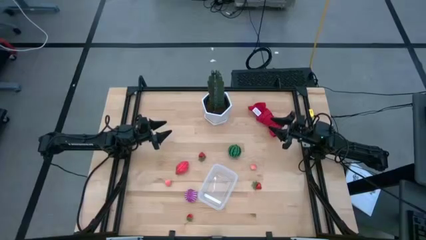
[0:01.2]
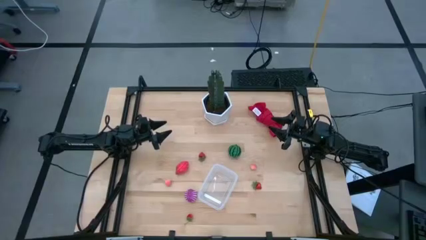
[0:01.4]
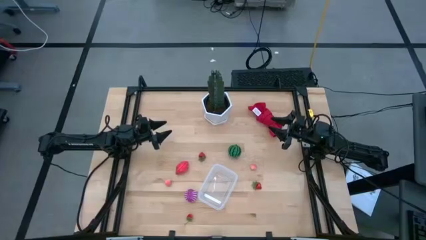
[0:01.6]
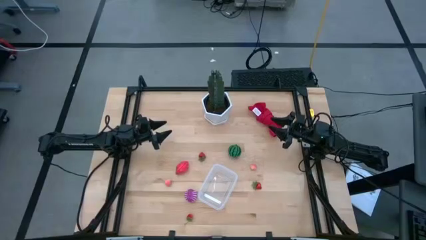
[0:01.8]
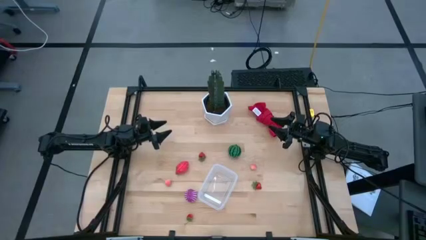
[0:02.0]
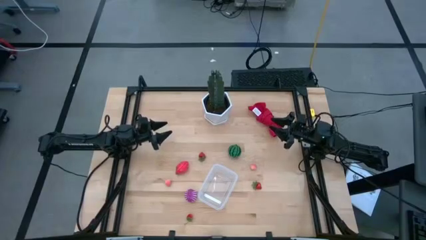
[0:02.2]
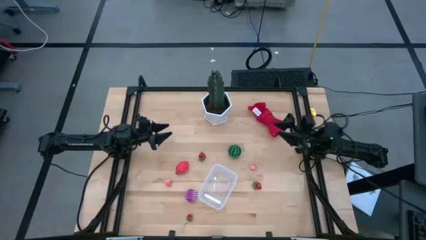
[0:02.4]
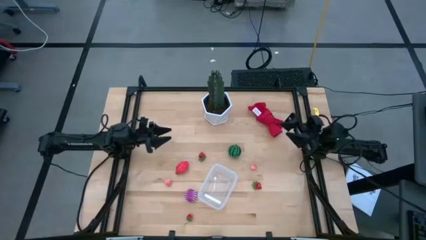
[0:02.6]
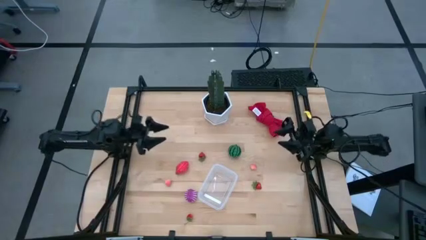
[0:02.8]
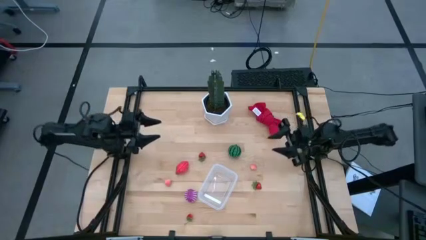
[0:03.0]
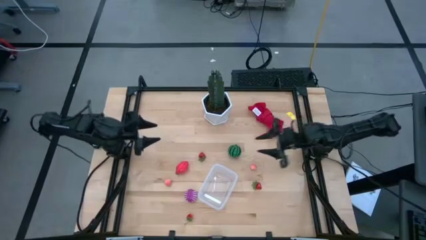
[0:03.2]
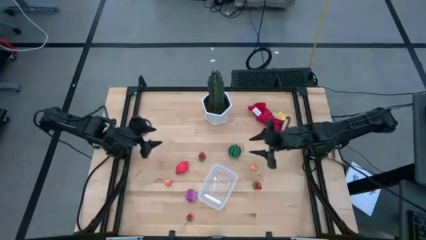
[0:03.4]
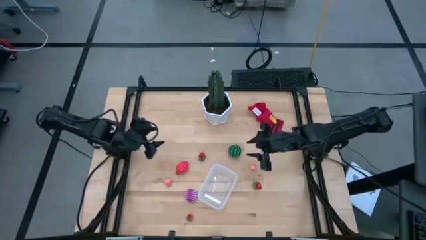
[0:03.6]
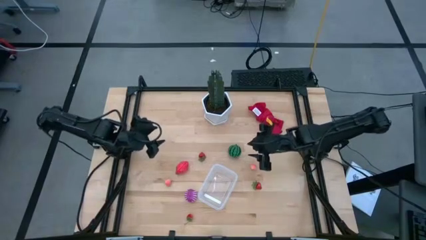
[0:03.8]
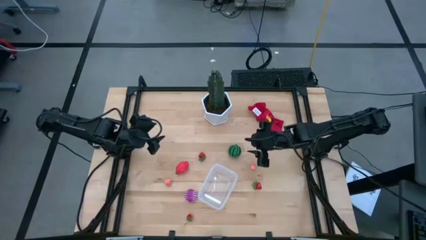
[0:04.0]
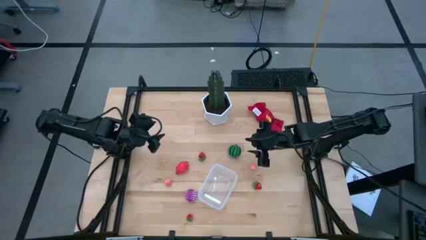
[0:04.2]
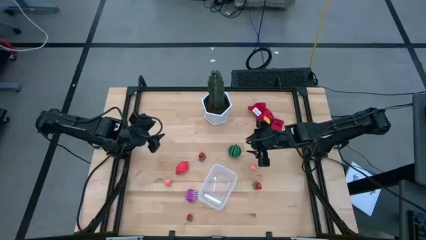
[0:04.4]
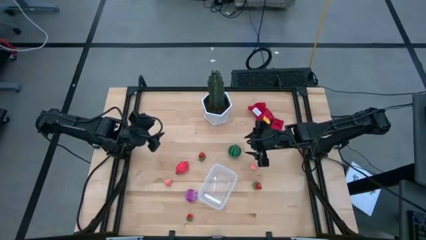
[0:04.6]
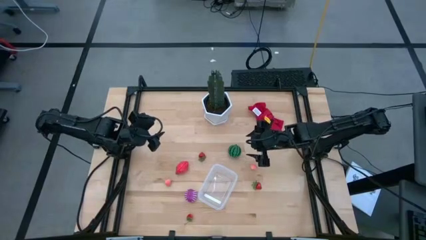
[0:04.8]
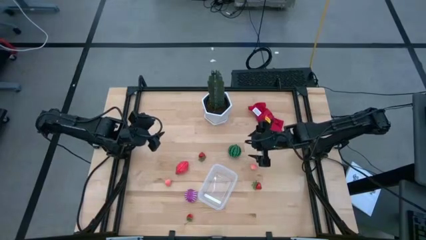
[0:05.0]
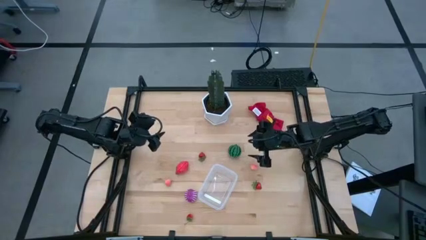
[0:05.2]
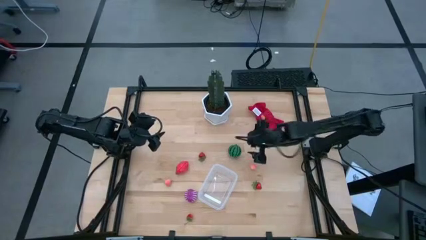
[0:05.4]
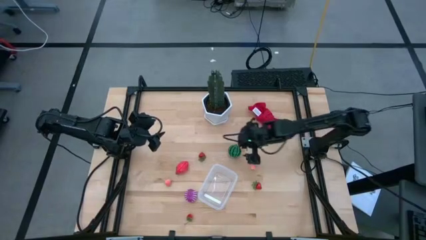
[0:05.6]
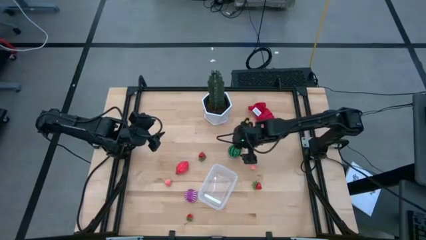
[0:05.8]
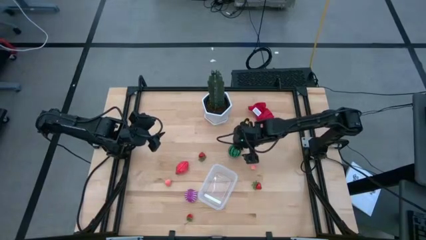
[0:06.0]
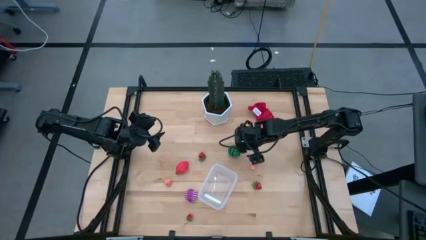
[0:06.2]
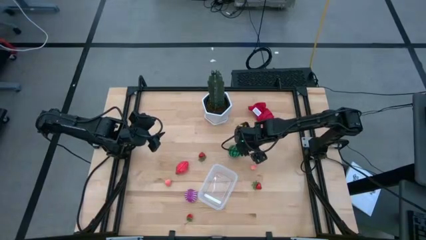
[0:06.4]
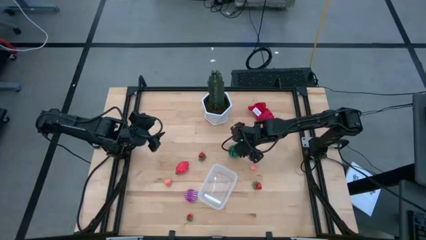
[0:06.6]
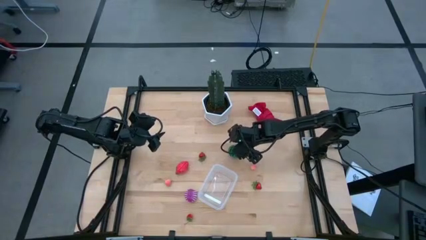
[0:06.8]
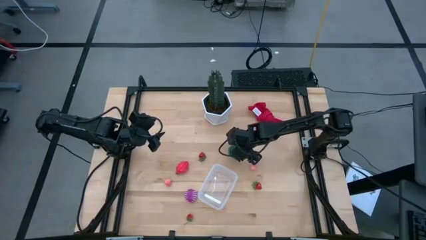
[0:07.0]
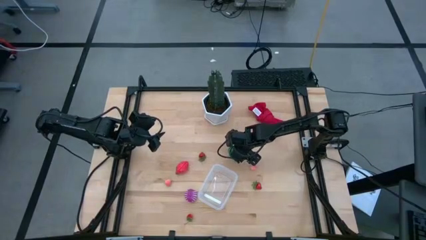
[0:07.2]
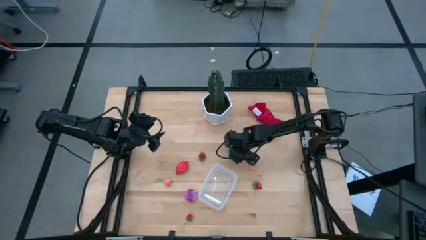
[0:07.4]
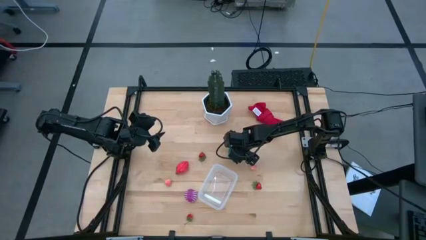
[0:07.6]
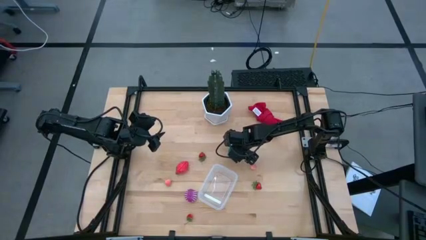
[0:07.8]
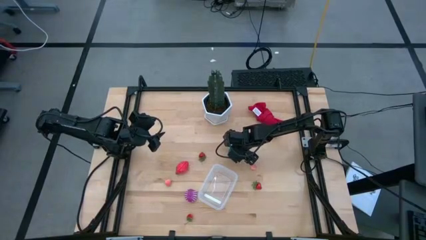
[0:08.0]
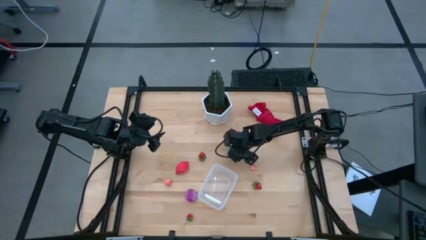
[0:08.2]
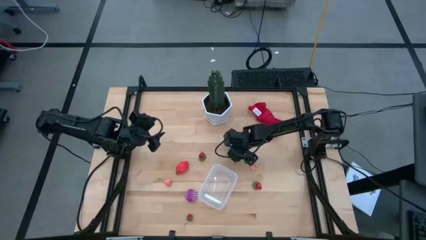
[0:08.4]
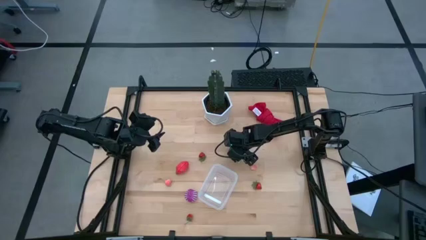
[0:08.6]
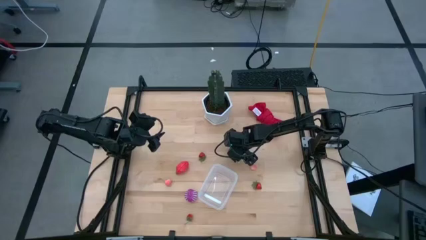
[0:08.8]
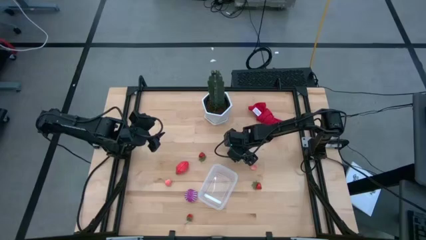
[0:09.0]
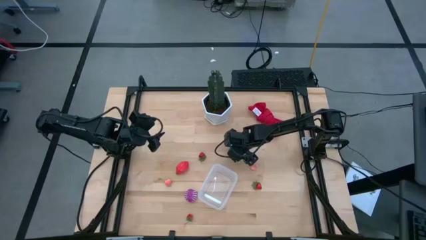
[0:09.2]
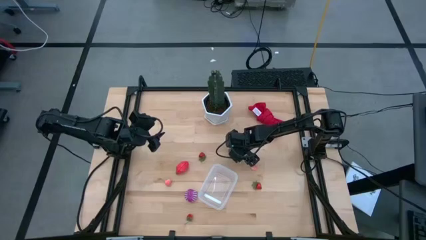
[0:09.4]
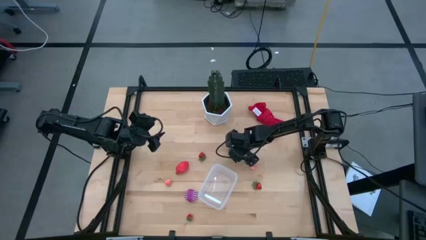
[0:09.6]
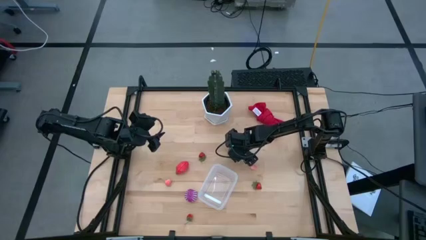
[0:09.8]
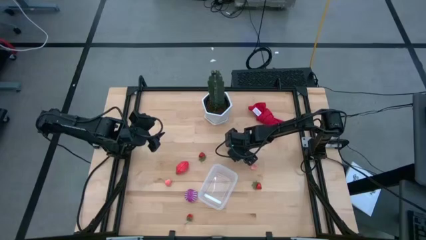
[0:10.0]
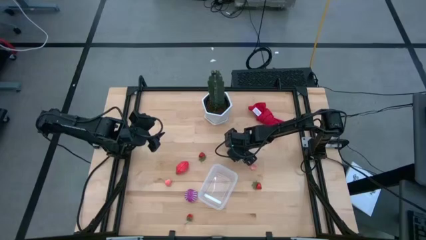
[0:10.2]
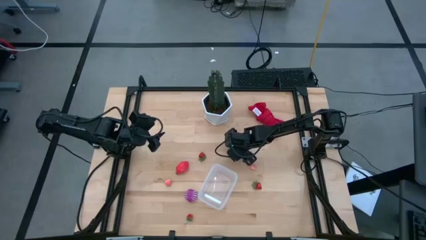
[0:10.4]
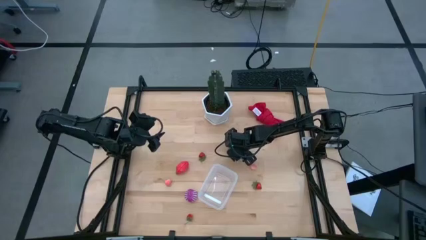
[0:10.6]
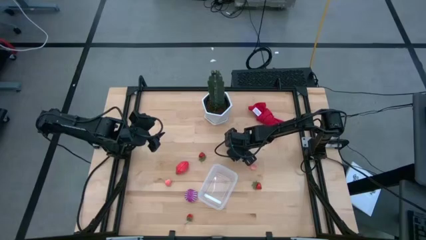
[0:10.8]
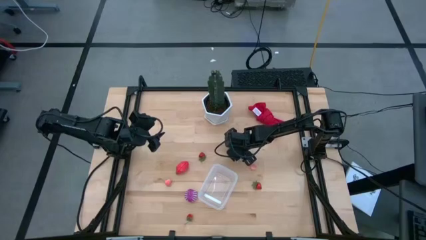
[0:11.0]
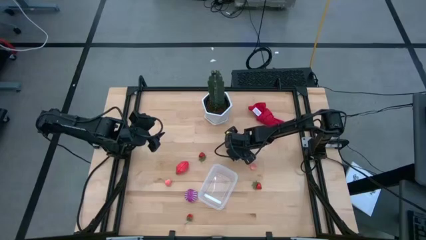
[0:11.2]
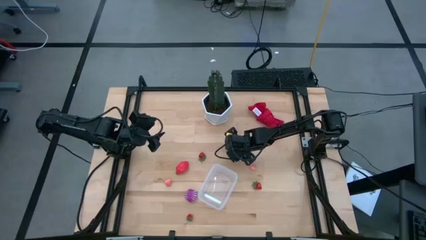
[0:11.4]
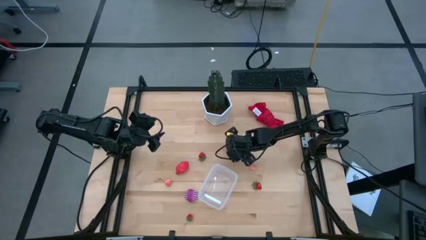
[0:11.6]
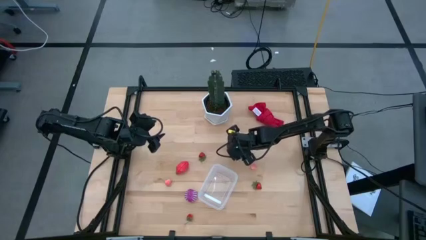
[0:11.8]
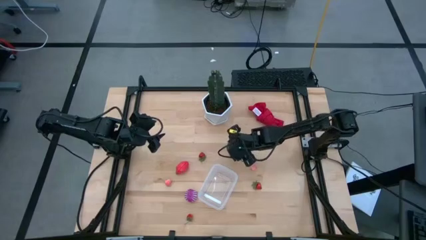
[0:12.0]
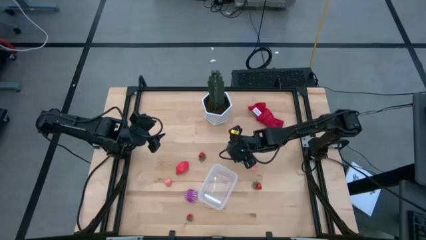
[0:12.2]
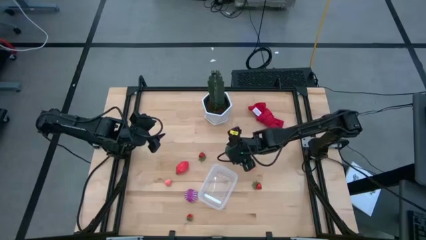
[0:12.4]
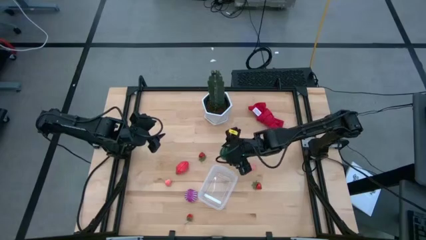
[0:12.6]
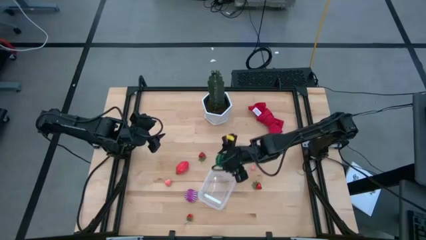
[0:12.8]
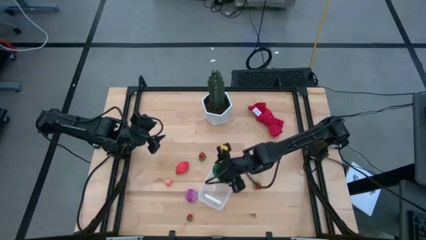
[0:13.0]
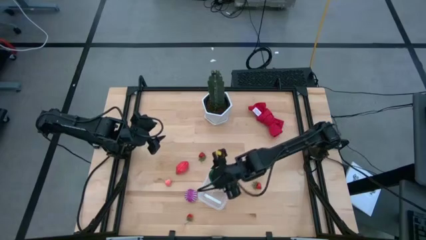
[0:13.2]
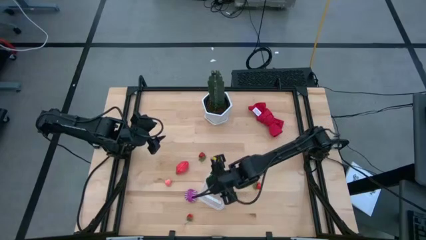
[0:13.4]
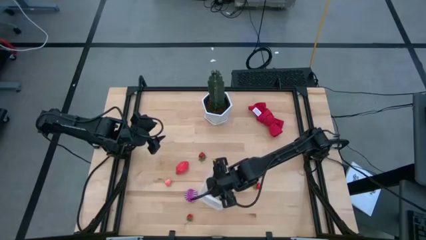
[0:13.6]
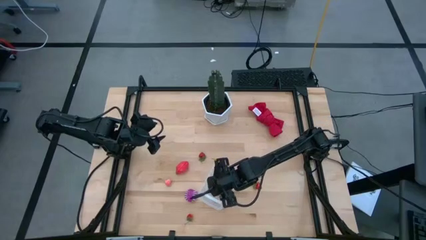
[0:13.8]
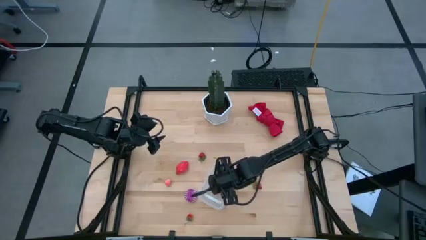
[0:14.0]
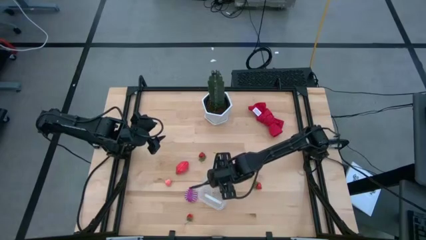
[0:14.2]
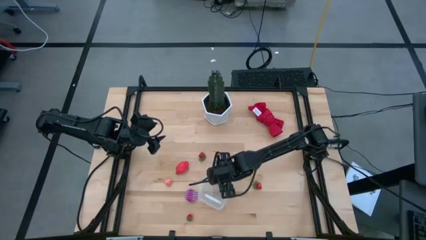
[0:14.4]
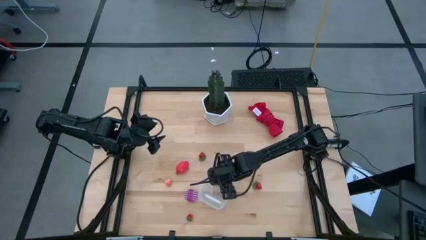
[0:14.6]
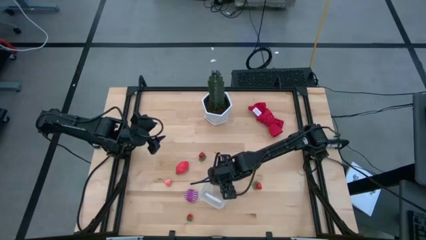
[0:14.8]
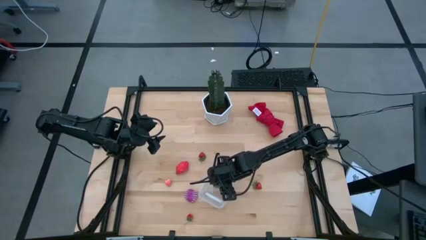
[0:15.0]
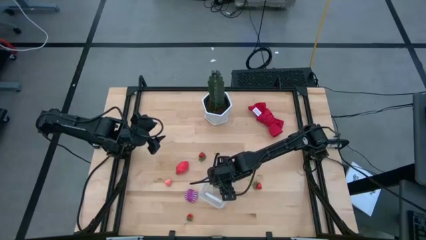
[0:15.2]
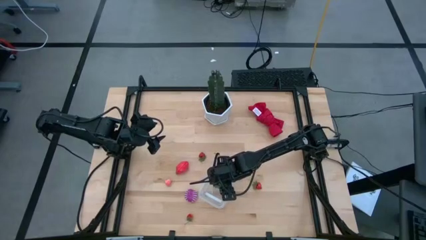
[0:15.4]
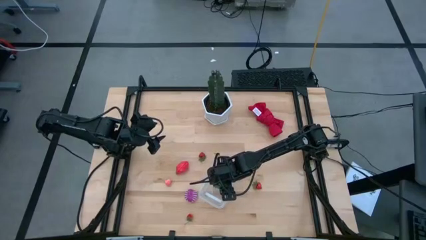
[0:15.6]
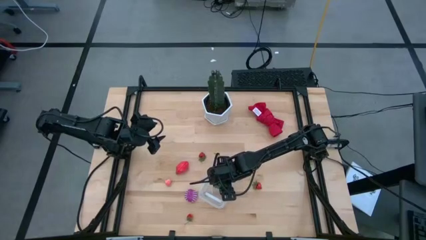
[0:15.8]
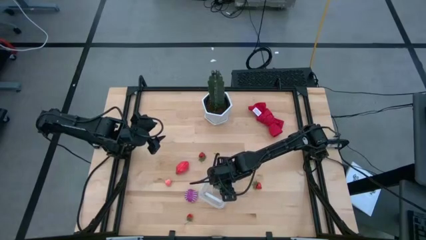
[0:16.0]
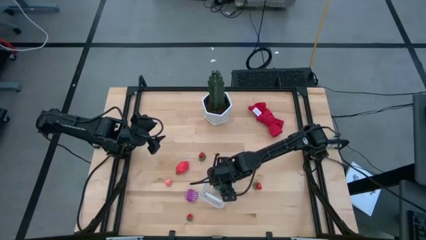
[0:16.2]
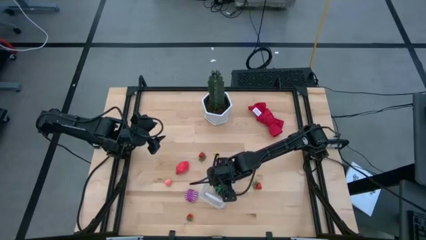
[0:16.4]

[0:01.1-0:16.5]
Task: Pick and placing Produce into tupperware
Put the green watermelon into the transparent bin
